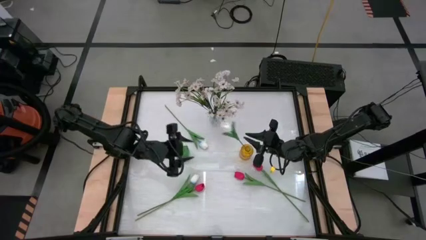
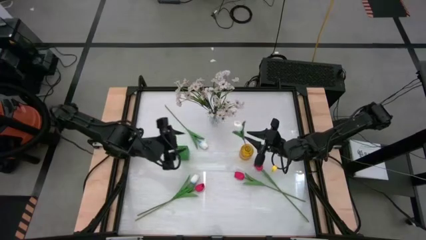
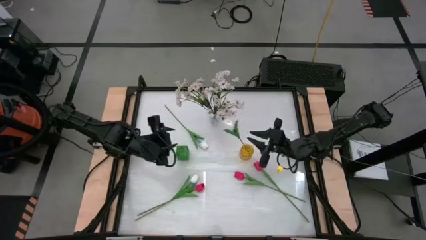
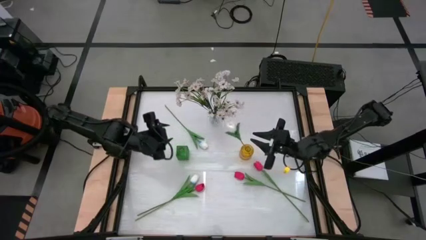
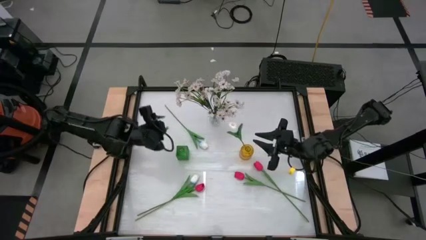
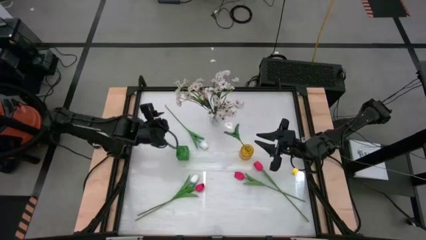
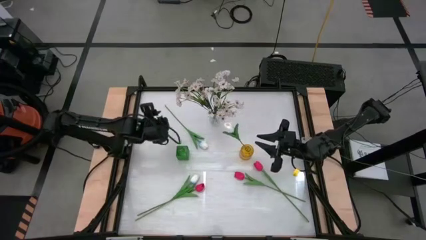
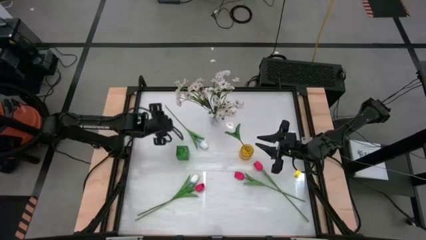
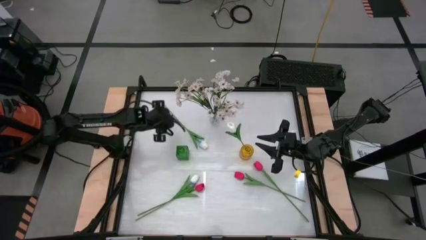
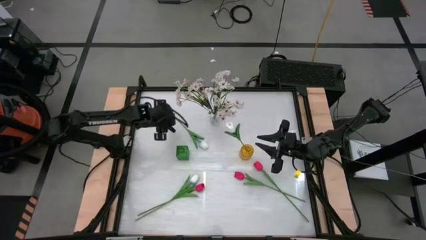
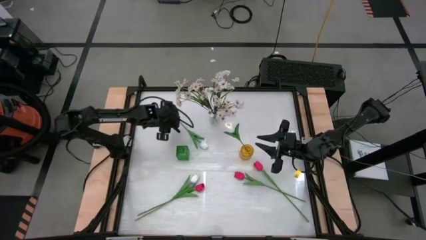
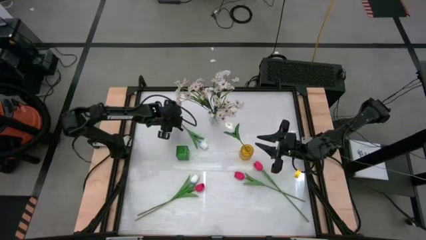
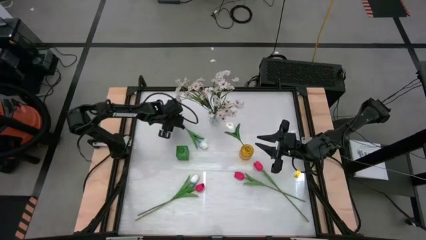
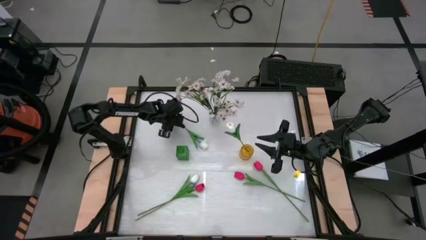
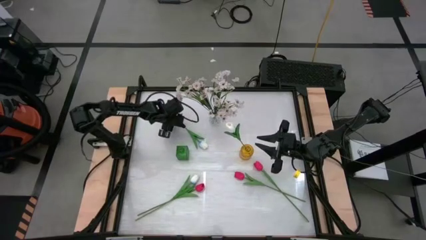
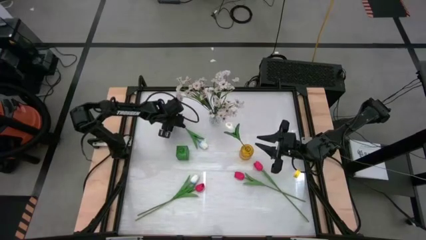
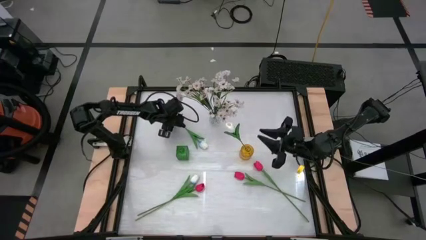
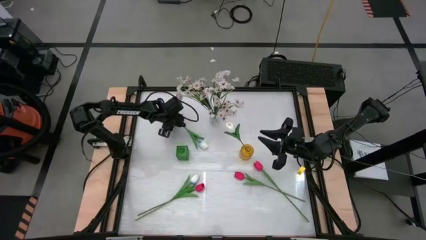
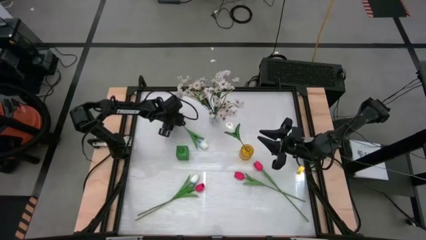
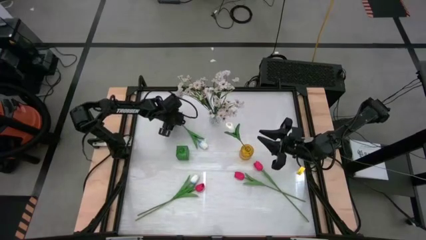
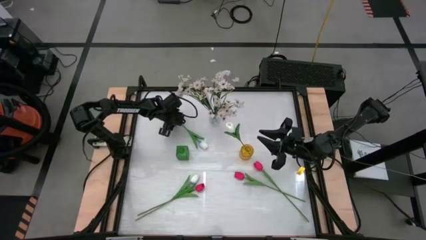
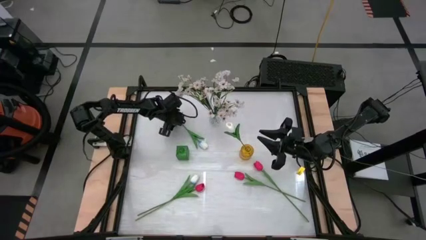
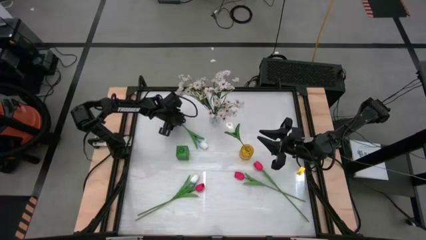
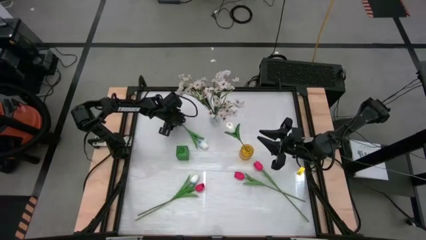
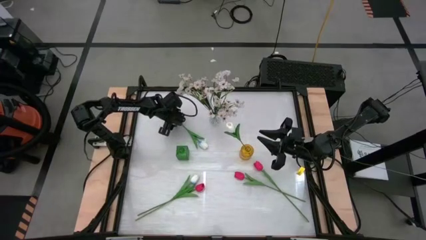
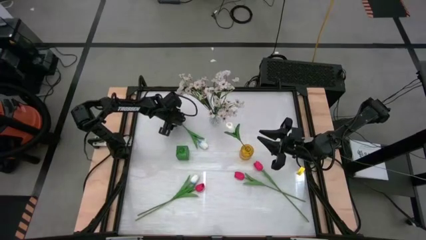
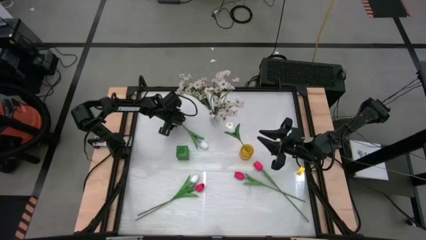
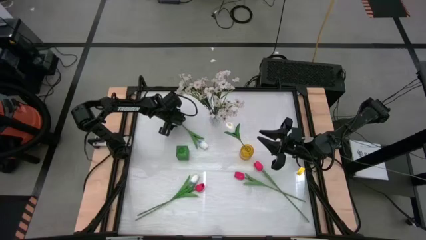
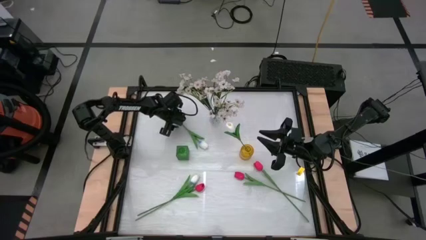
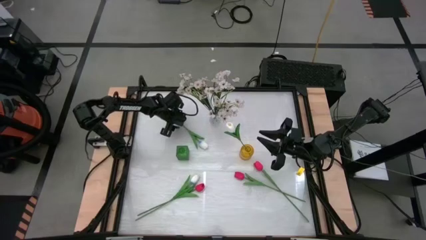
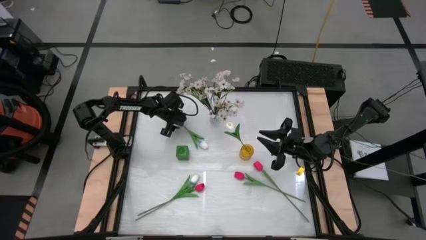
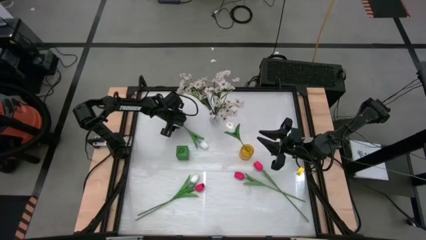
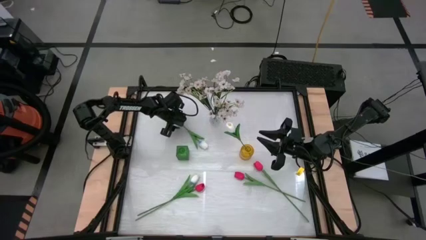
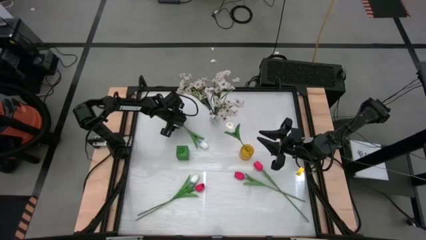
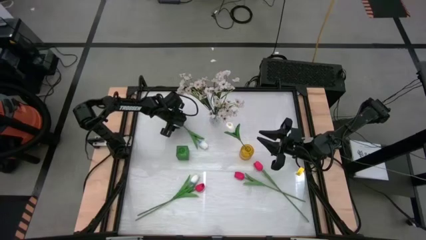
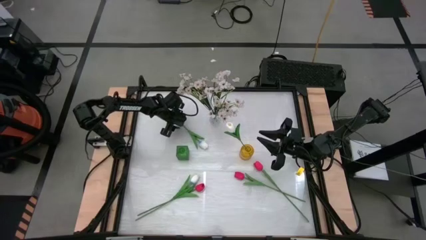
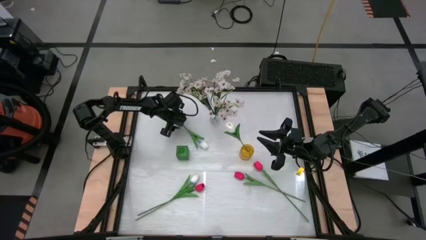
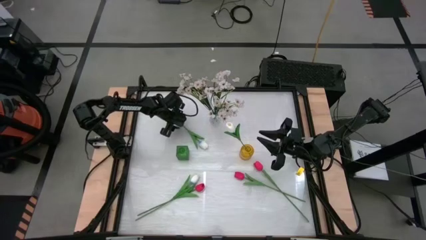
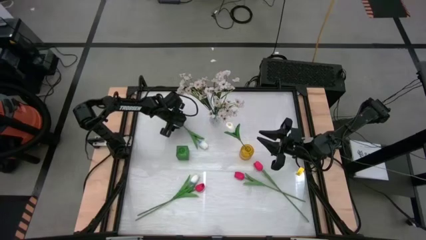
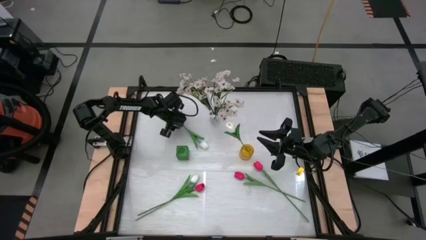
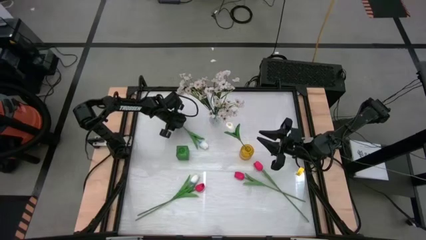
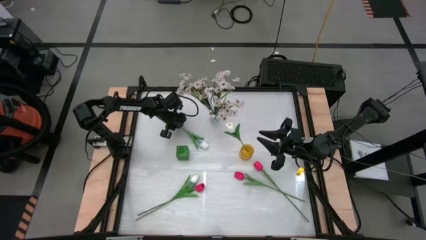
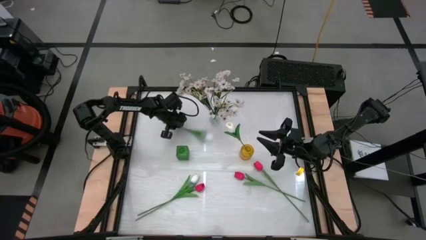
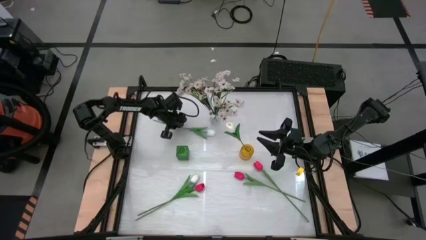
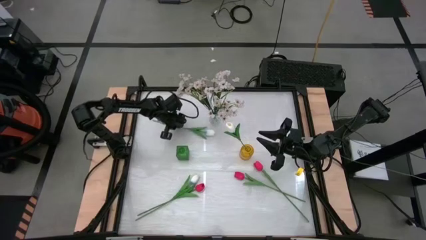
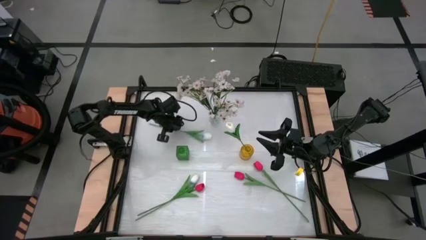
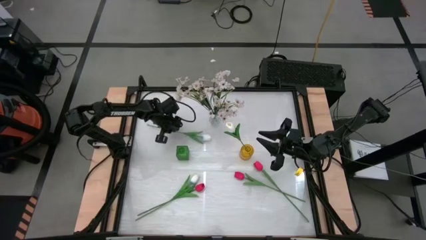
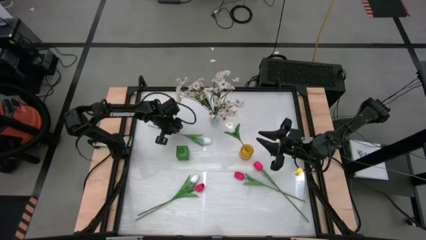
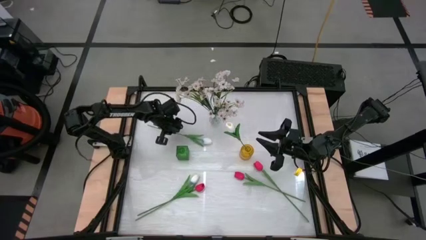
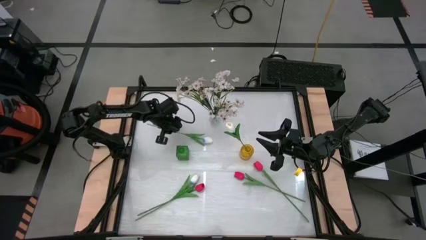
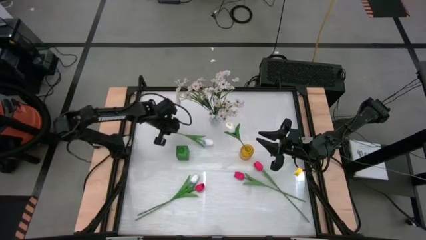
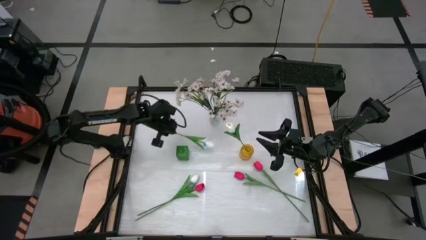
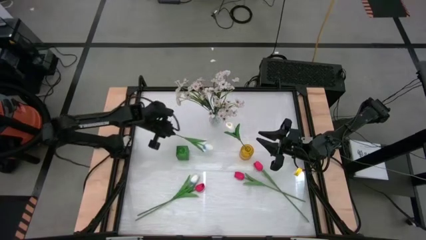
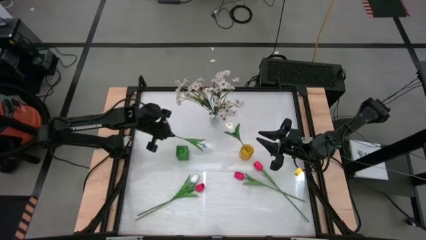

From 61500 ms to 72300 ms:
Task: Sort flowers into vase by color
Put the top white flower into the yellow vase
